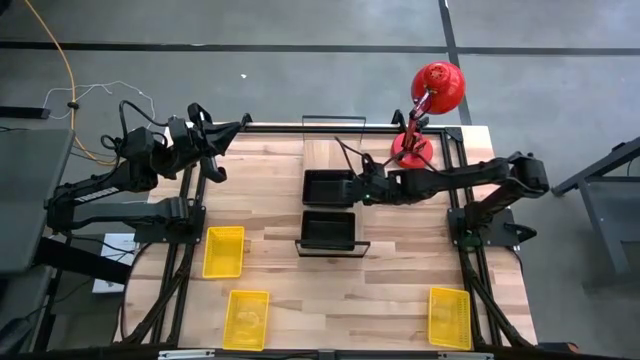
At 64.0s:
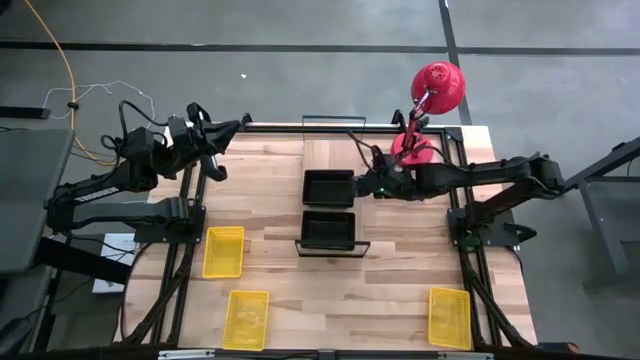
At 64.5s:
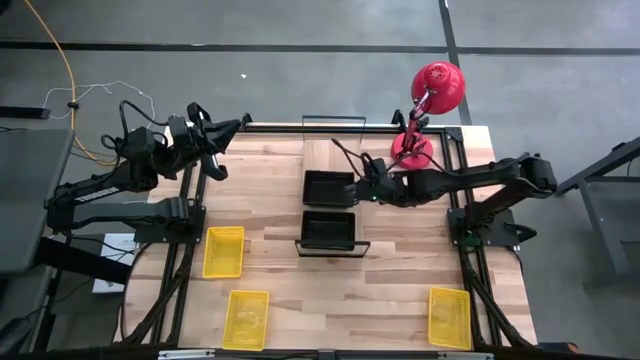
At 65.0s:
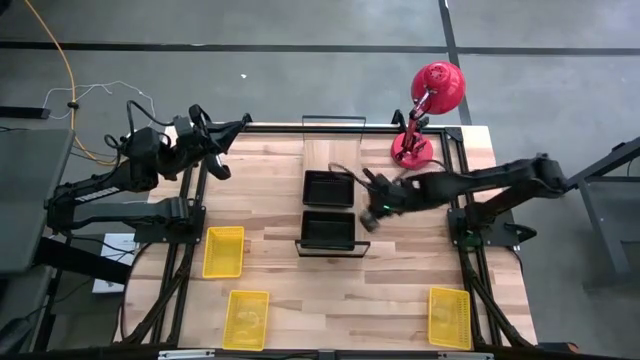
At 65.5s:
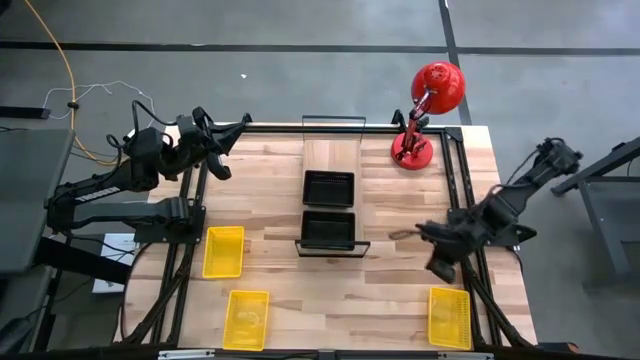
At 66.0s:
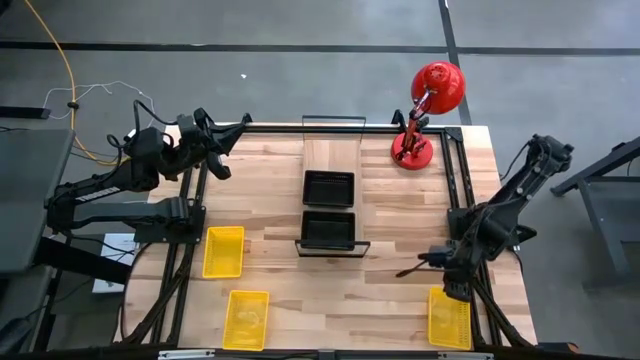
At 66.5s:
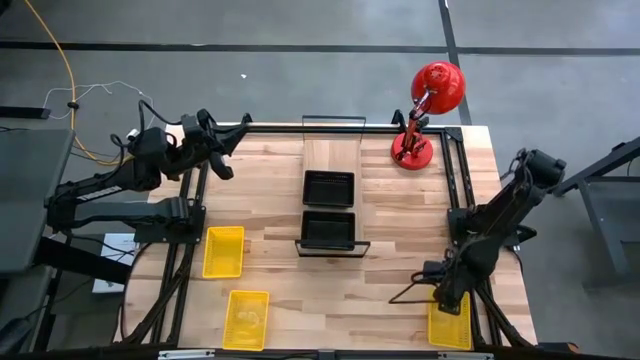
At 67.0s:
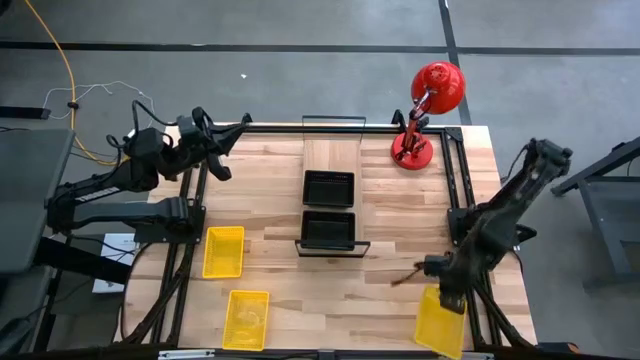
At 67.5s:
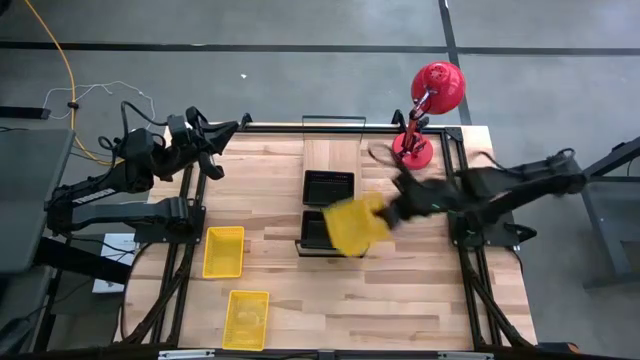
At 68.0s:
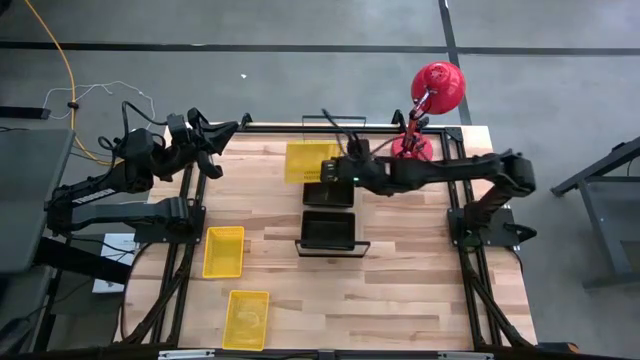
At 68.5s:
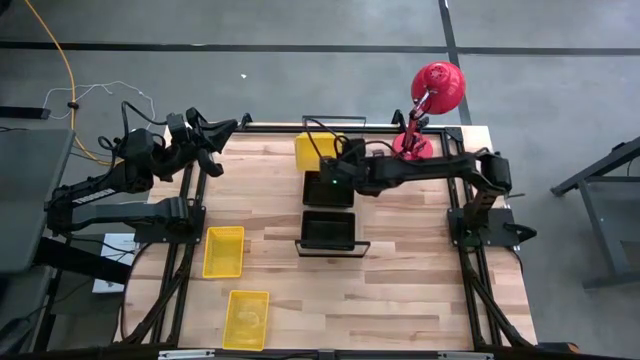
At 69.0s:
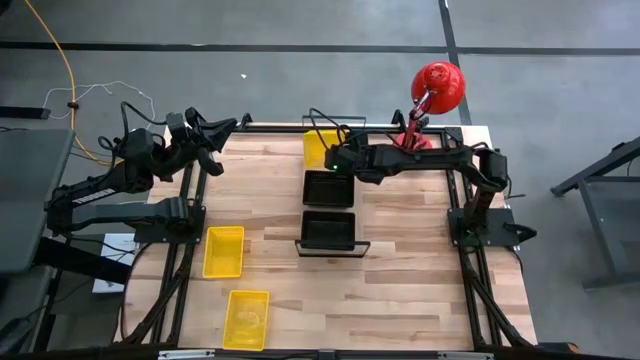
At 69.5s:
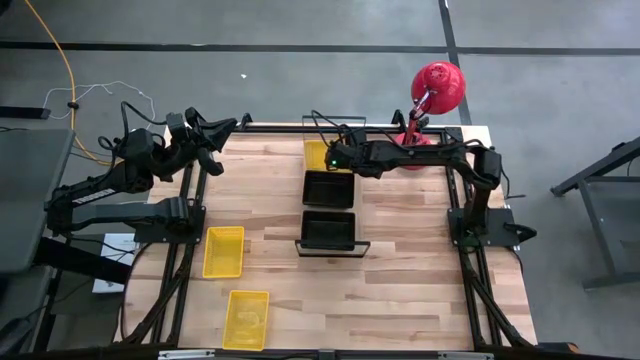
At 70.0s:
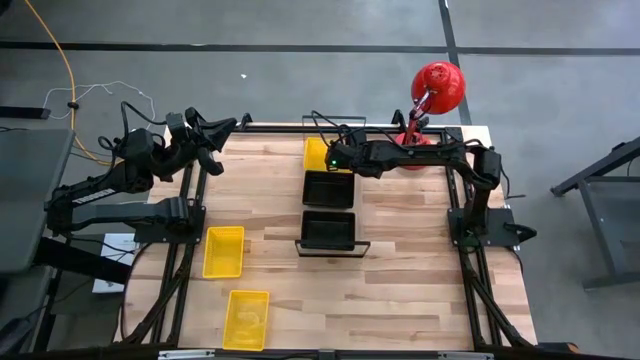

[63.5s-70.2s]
Task: Stack baskets on shelf by color
Put the yellow bin on the shelf

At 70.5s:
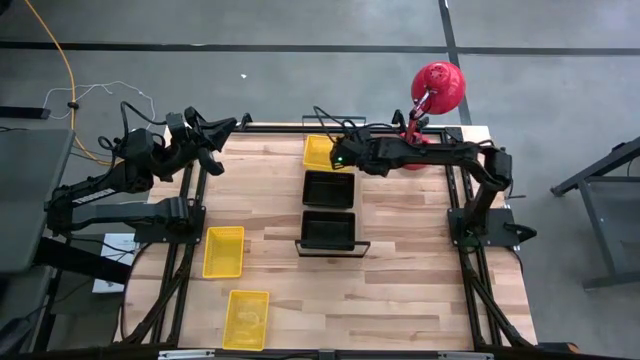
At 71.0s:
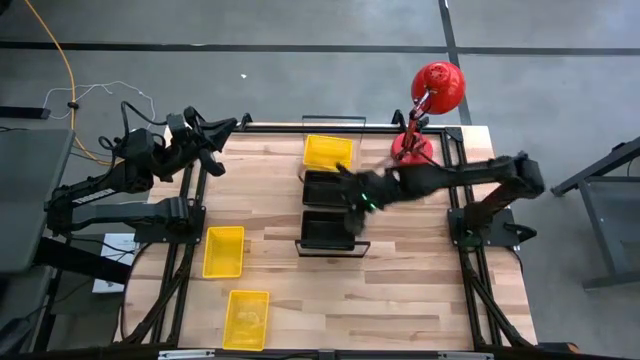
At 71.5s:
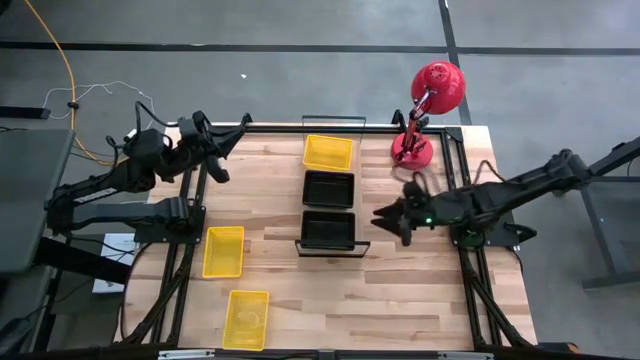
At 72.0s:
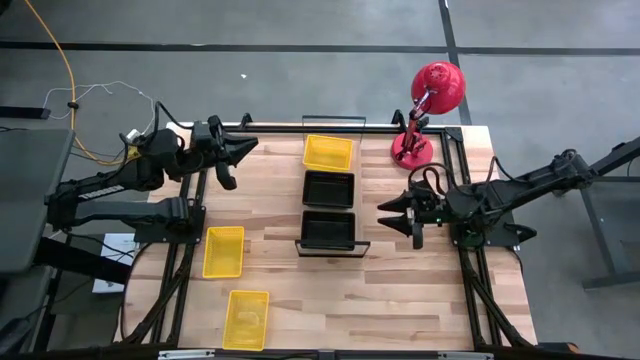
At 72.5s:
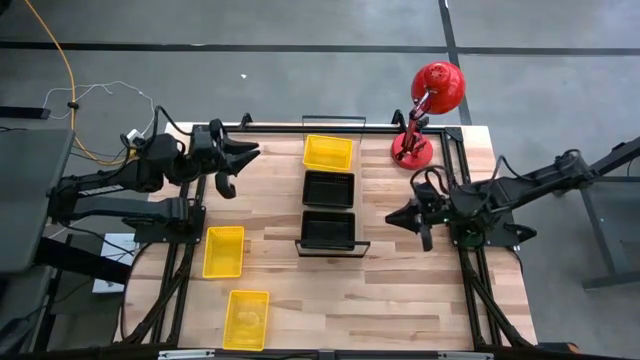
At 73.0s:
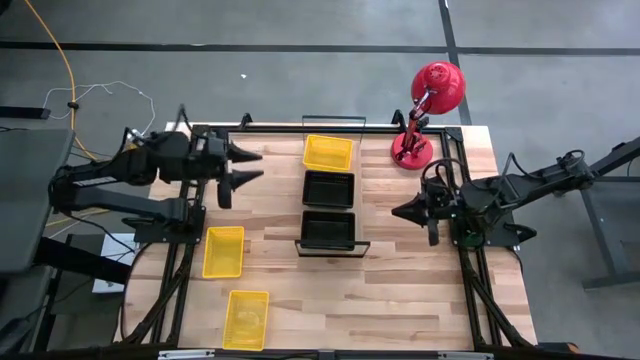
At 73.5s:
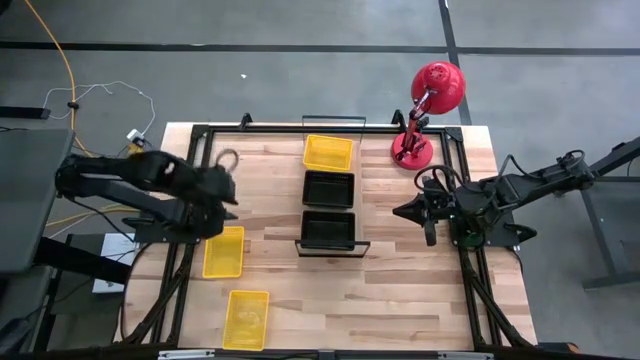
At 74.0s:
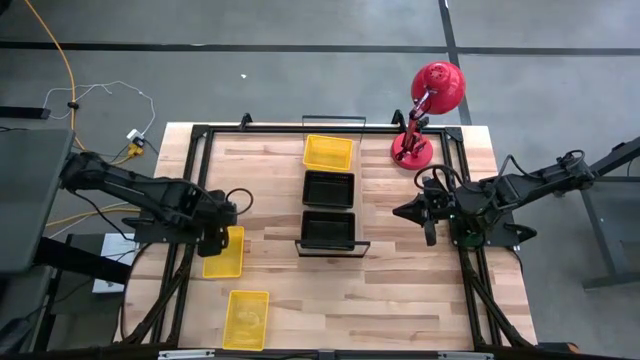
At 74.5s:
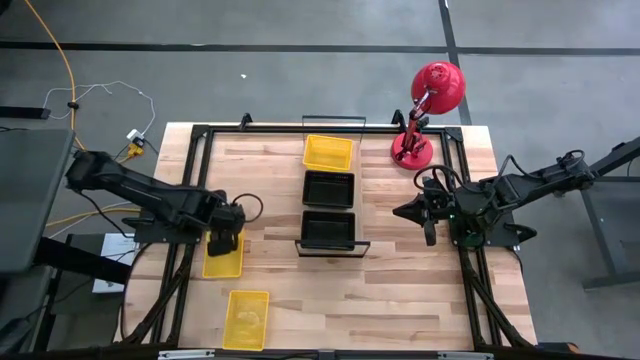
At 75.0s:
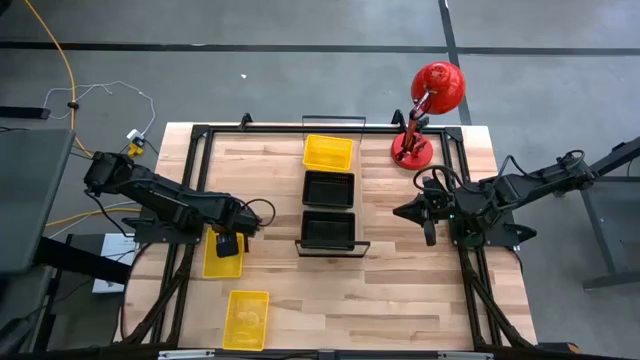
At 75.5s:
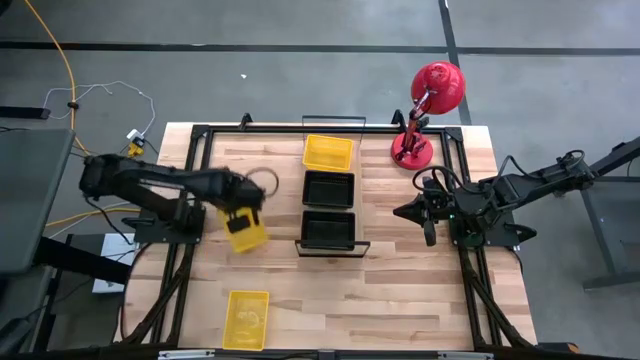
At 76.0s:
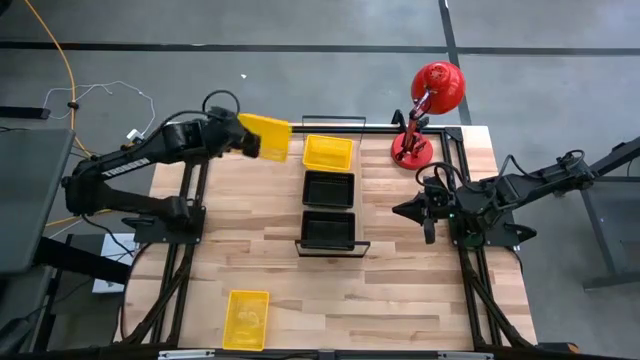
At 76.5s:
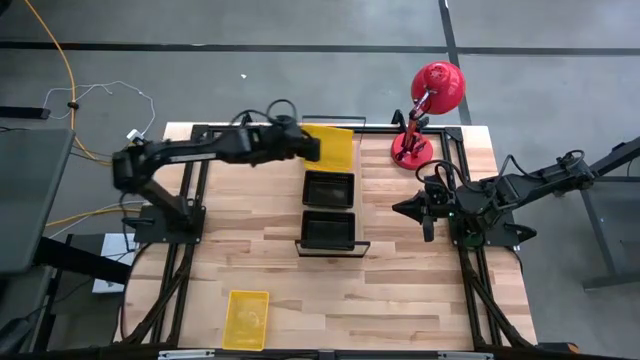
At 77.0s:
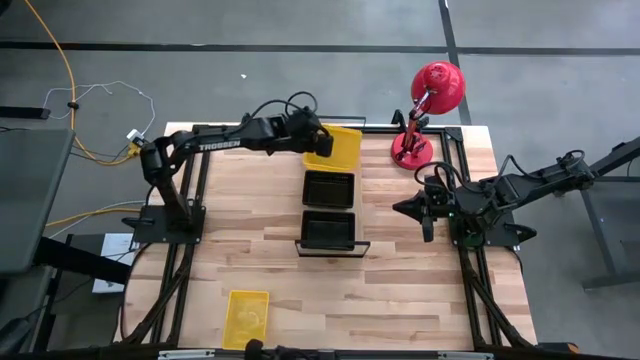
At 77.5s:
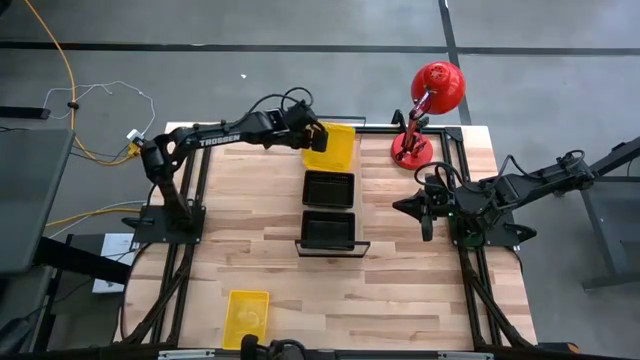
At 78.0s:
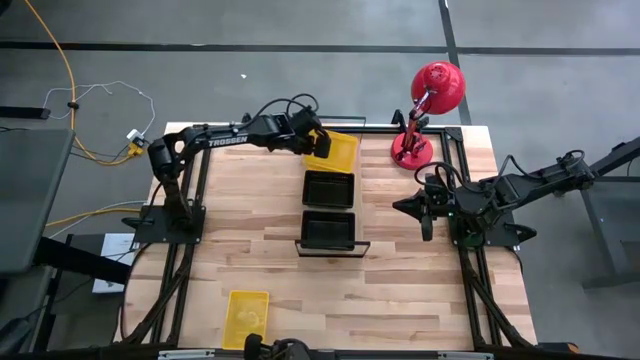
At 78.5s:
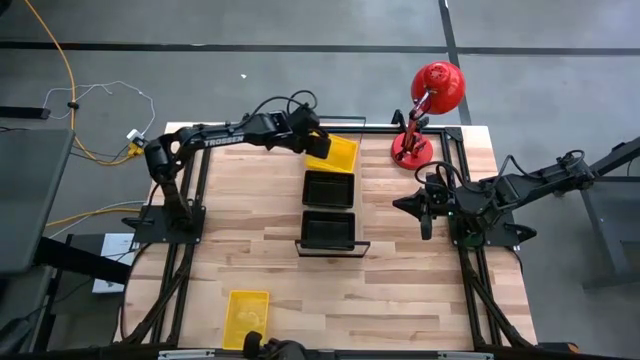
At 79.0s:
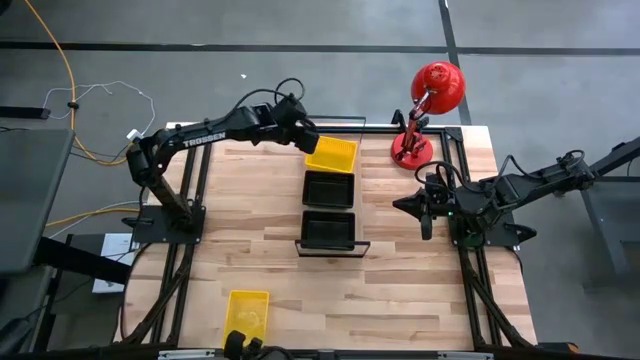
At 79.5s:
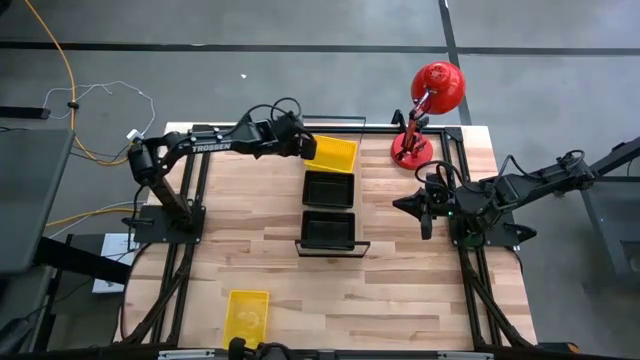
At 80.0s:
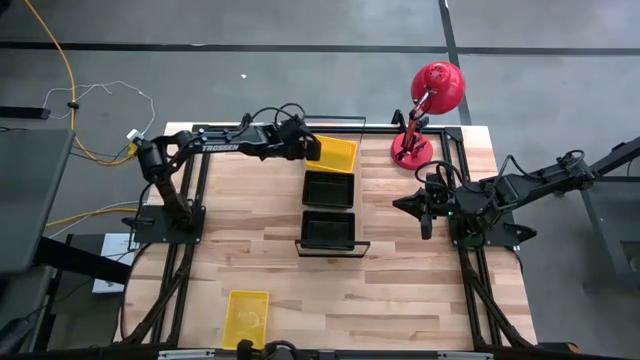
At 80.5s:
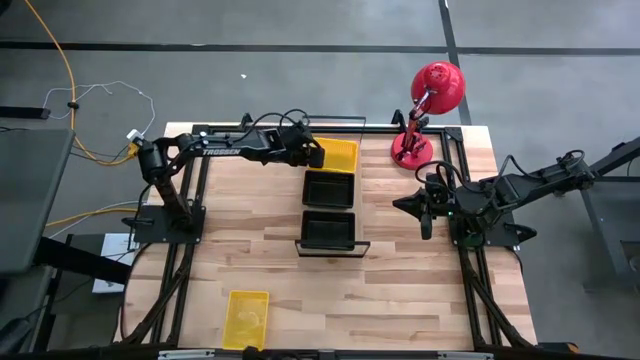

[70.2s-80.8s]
Stack the yellow bin on top of the yellow bin on the shelf

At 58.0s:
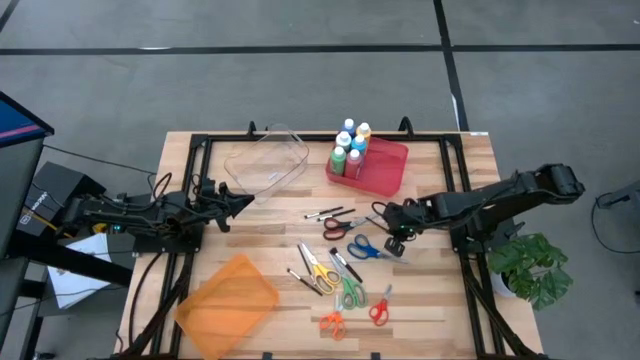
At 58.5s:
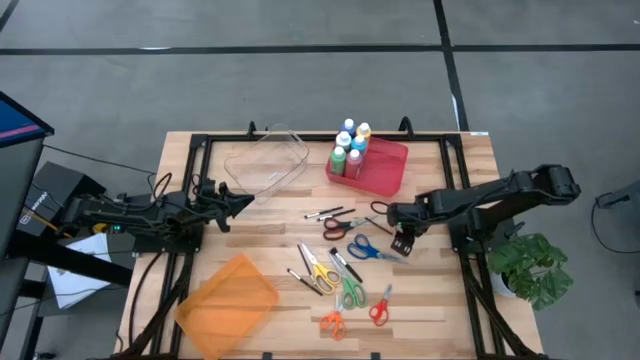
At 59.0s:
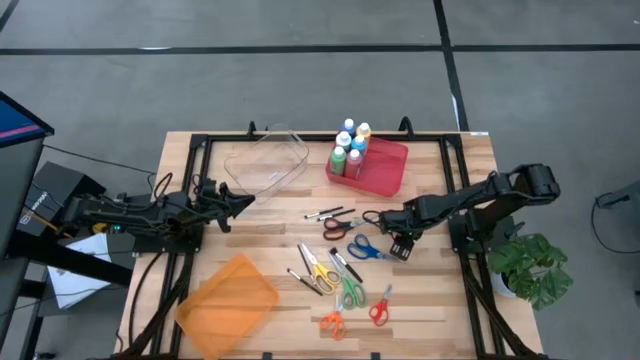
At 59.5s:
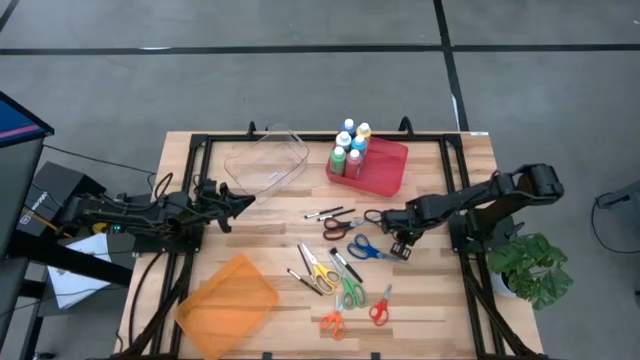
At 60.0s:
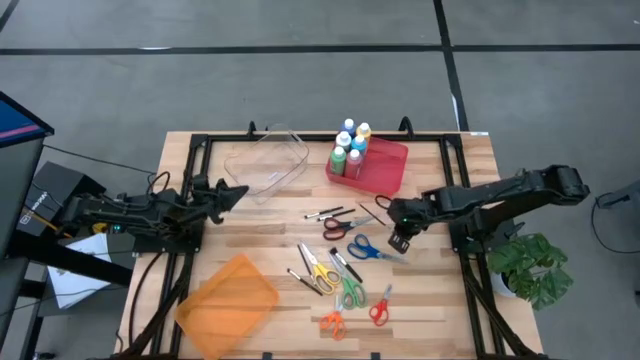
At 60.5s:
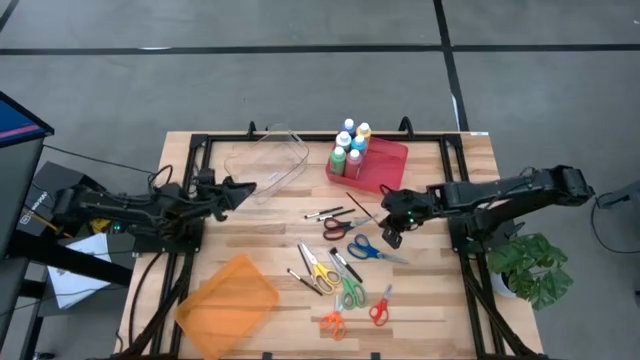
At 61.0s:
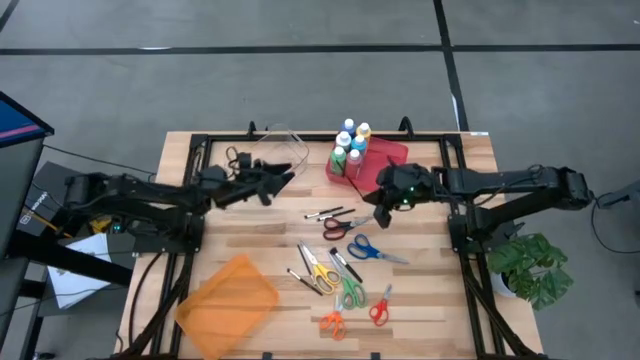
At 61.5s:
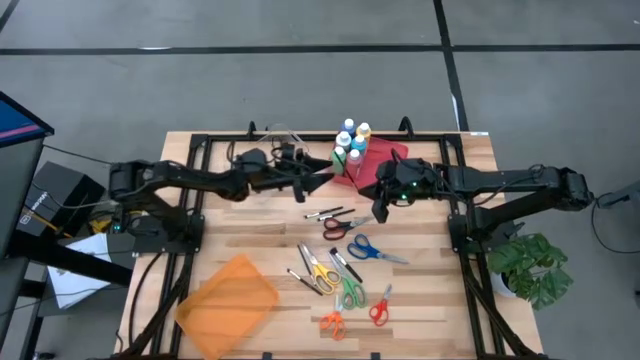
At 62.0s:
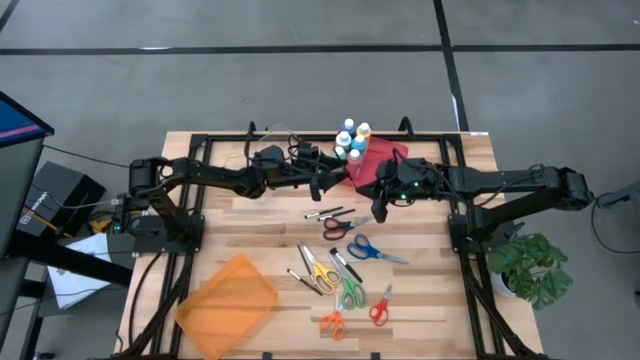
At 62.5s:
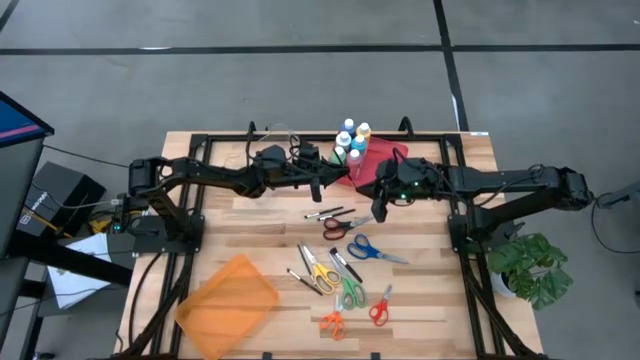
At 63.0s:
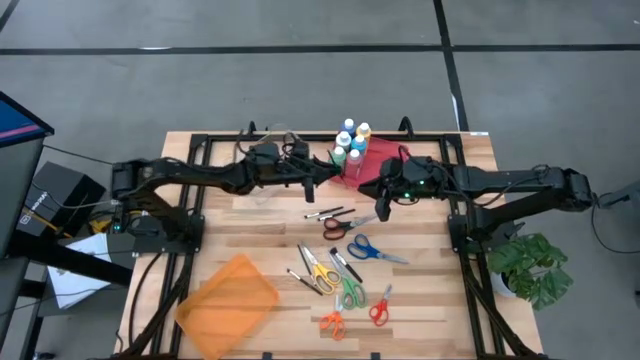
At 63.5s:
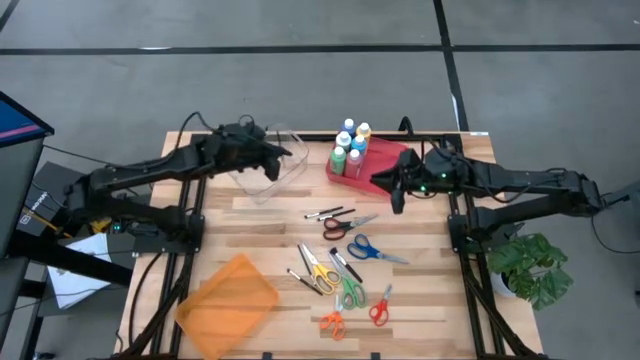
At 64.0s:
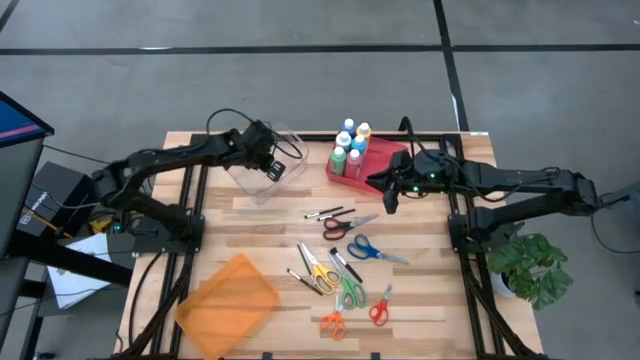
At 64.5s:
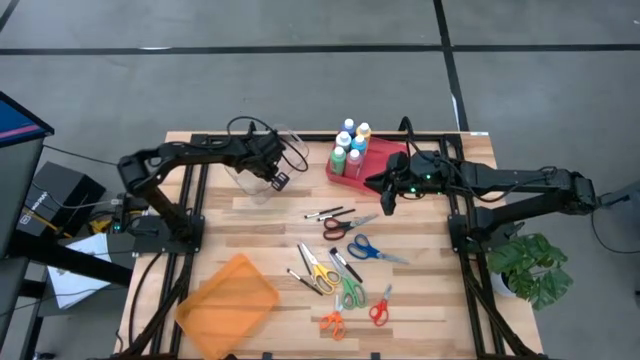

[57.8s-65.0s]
Task: Pick & Place Paint Supplies
Put the black paint brush into the transparent bin
